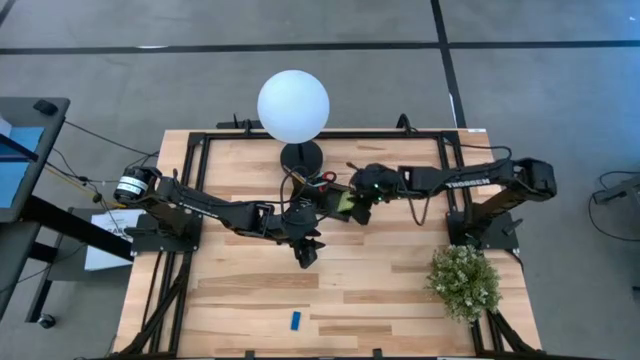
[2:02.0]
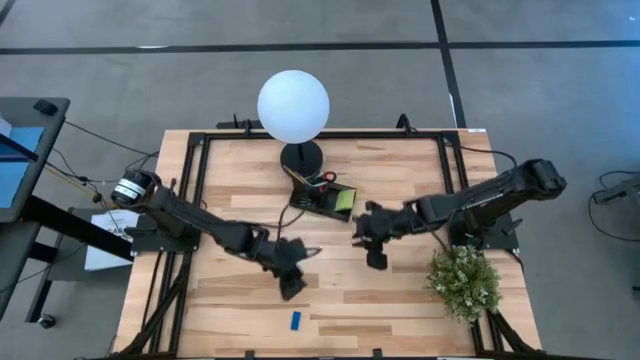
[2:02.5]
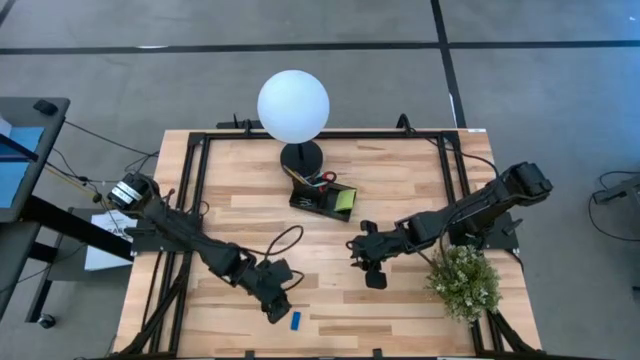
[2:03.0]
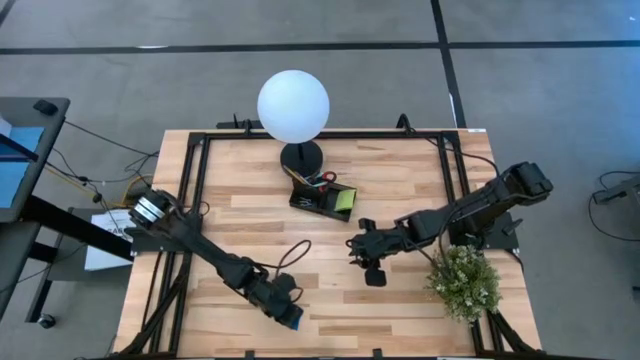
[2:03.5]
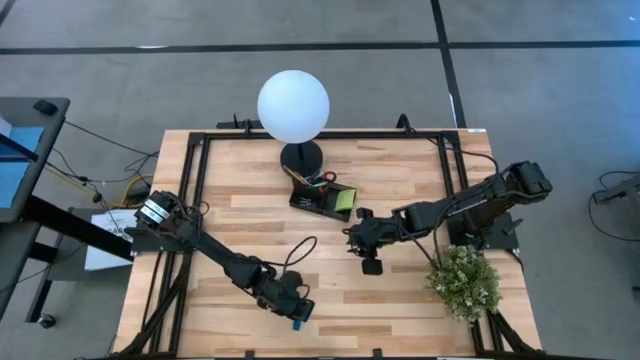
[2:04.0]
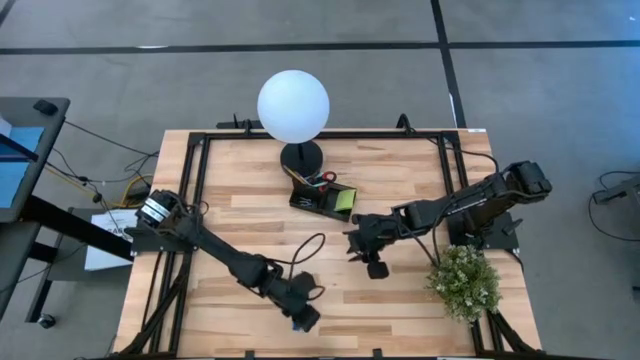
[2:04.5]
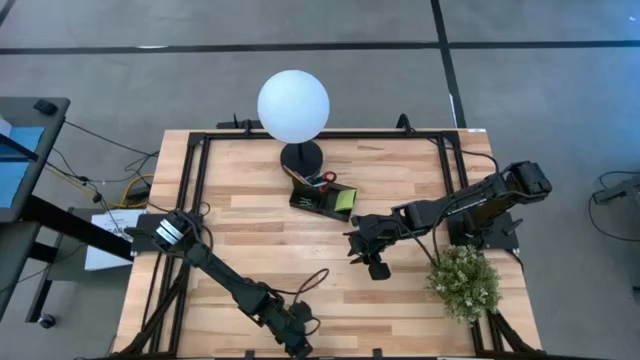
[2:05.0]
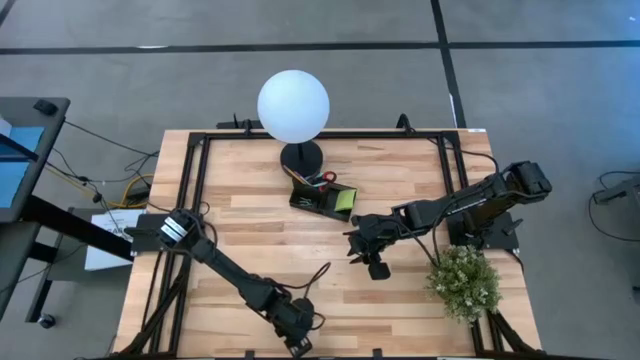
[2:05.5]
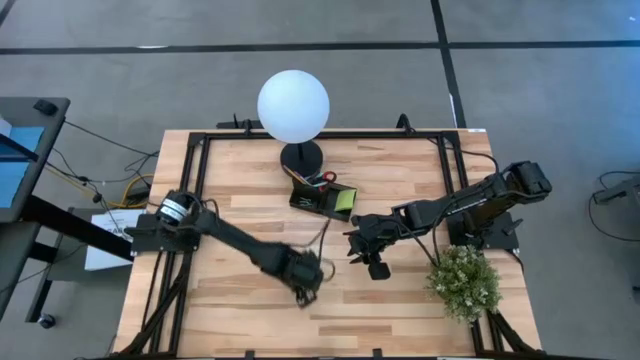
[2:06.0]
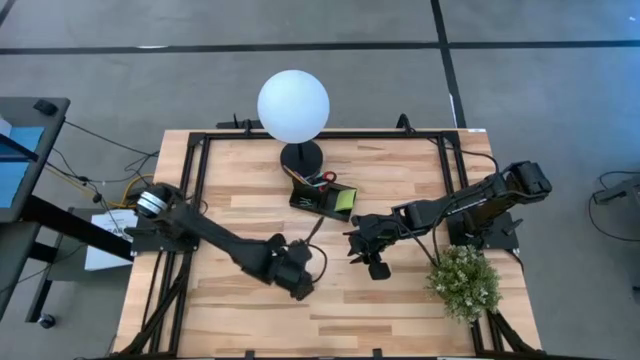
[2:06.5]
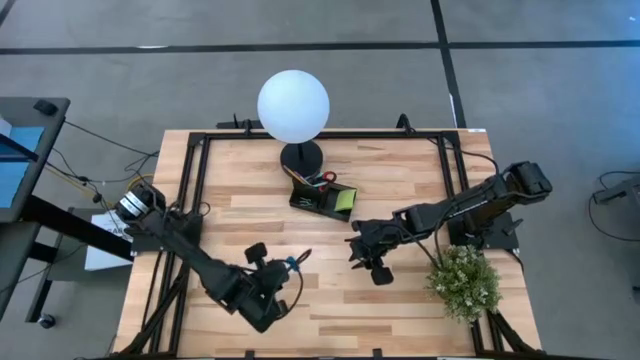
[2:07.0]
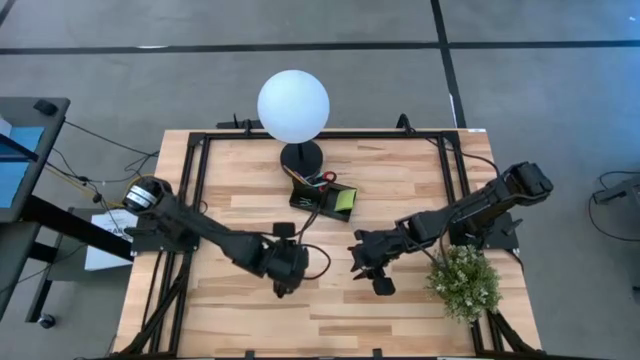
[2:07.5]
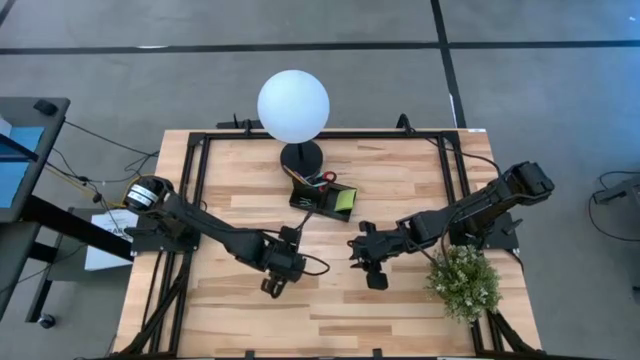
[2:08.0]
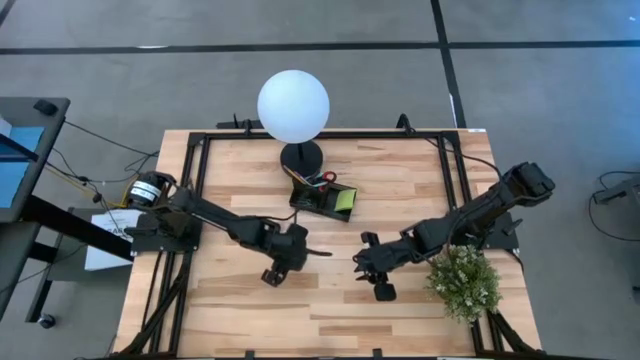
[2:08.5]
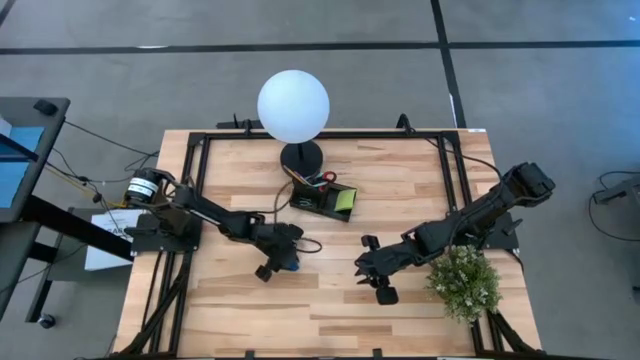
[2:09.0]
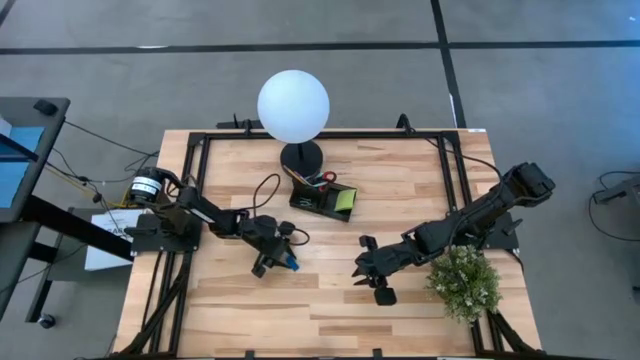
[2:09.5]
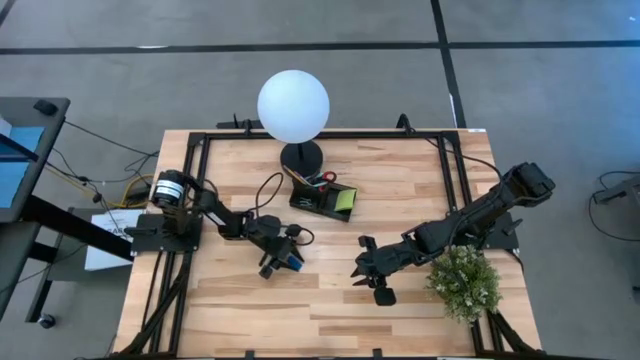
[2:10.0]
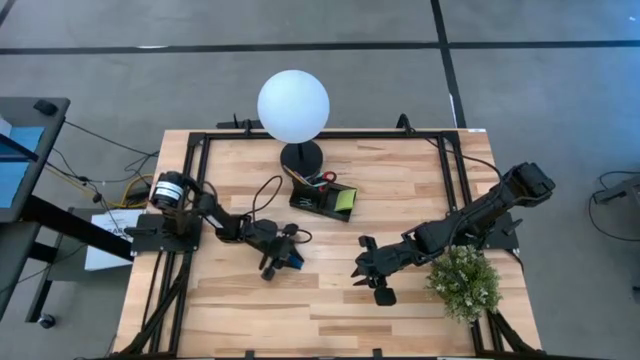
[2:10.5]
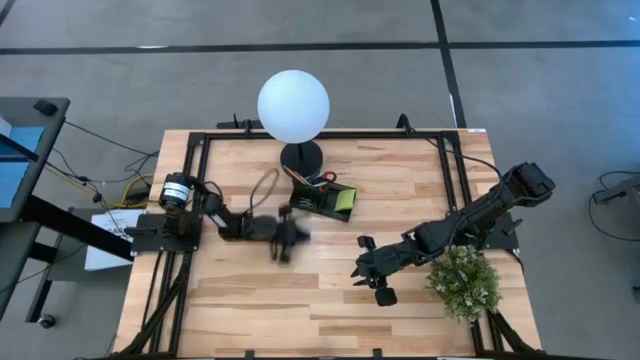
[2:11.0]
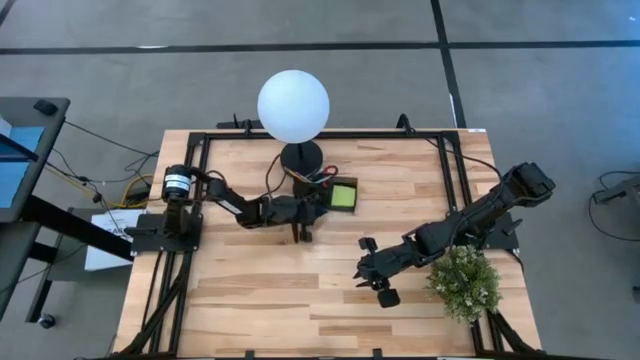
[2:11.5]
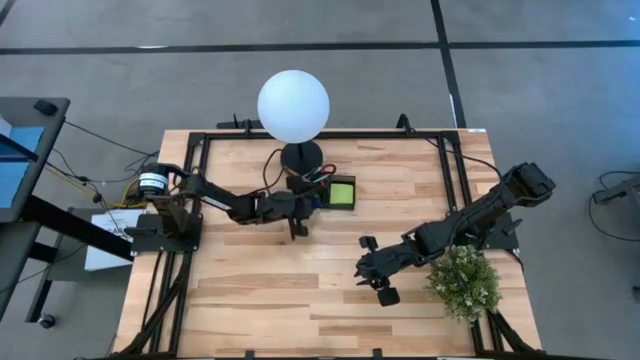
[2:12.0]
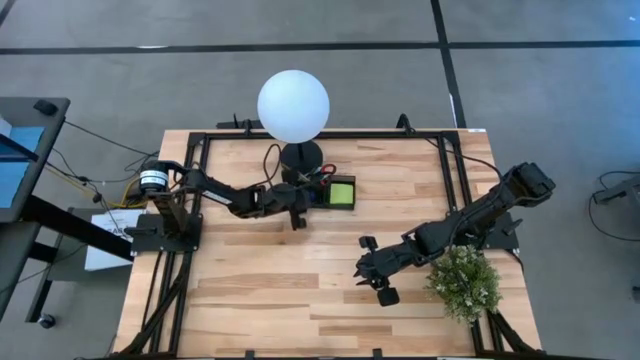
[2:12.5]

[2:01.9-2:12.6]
Task: Pick and place office supplies into organizer
Put the eraser into the desk organizer

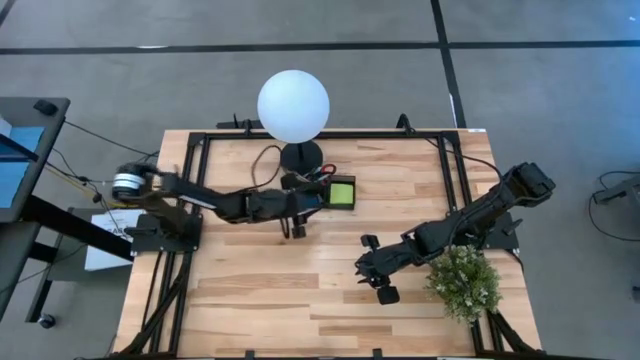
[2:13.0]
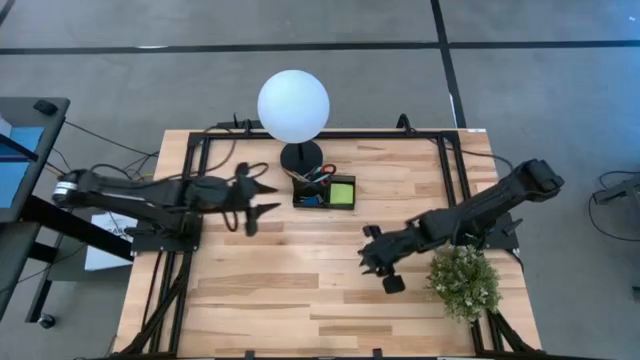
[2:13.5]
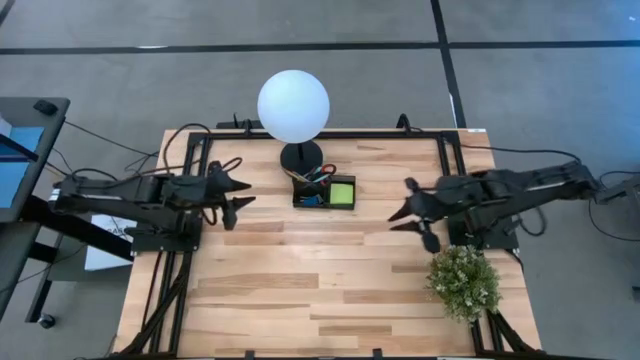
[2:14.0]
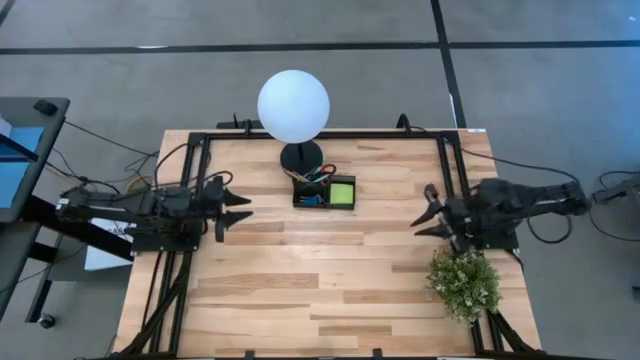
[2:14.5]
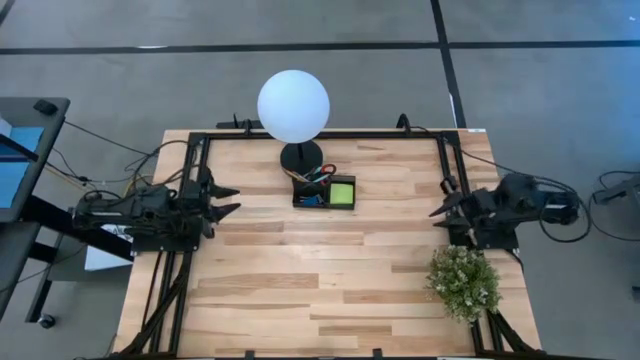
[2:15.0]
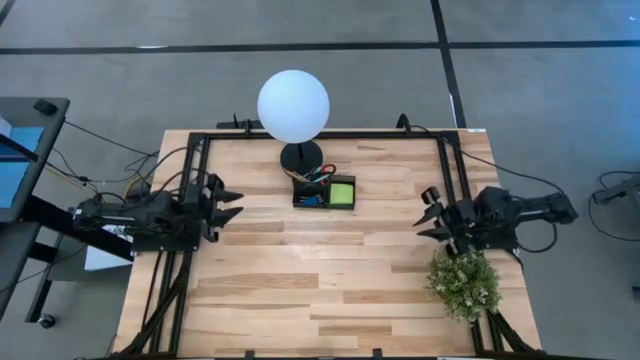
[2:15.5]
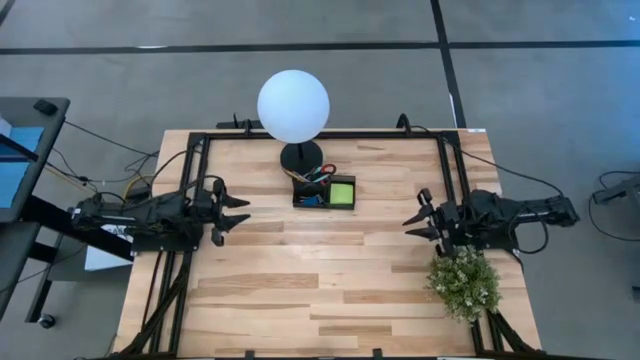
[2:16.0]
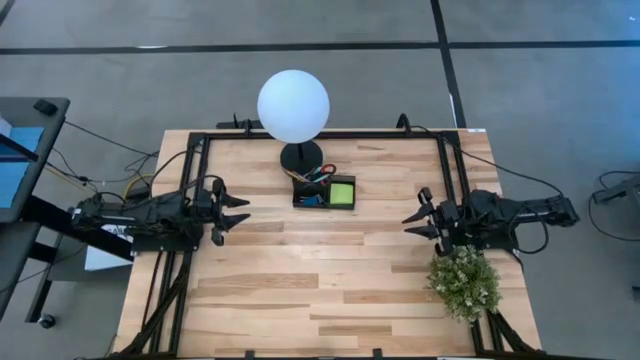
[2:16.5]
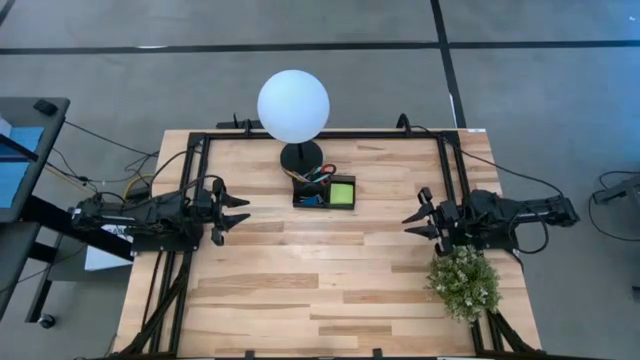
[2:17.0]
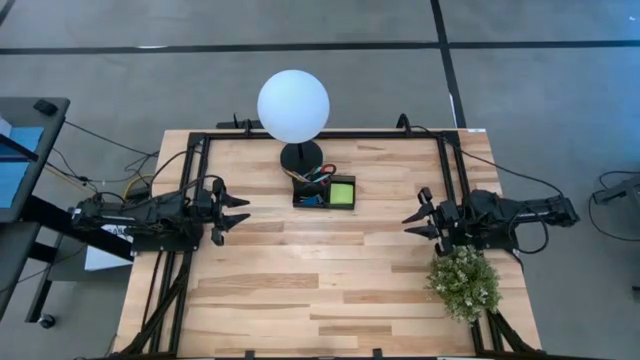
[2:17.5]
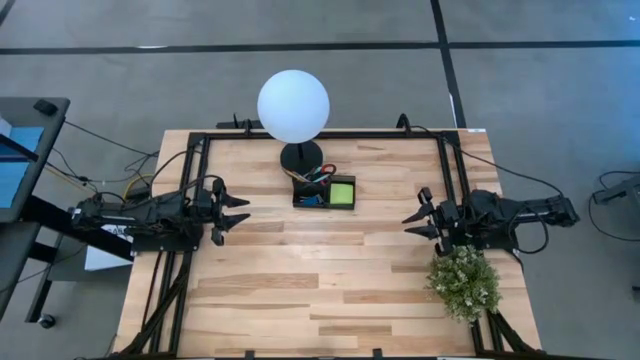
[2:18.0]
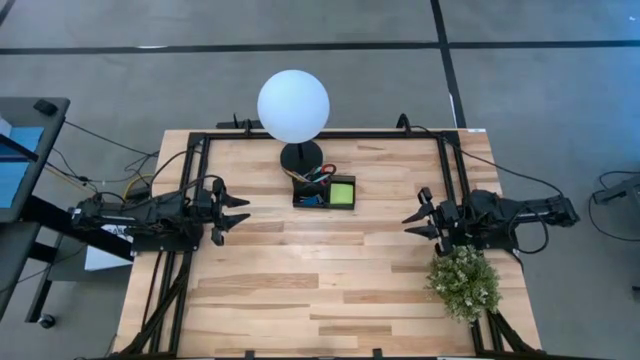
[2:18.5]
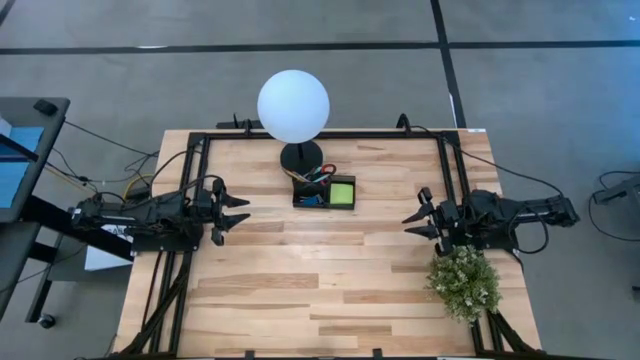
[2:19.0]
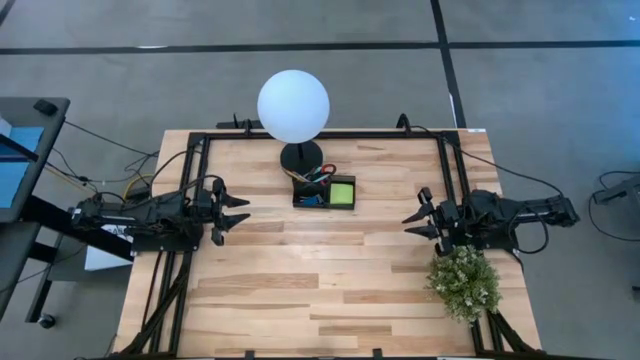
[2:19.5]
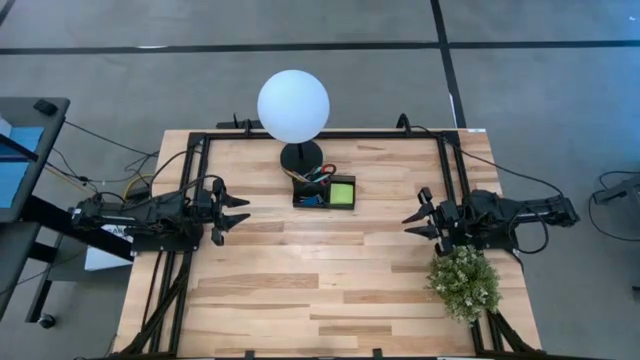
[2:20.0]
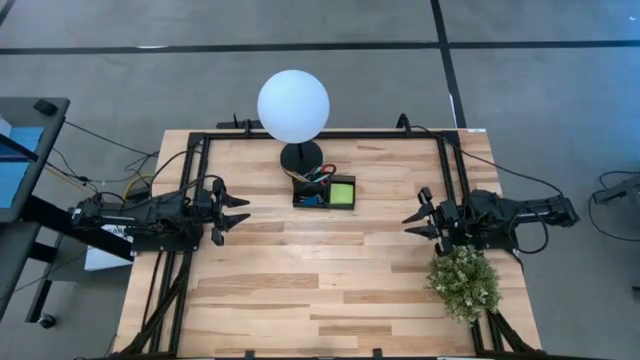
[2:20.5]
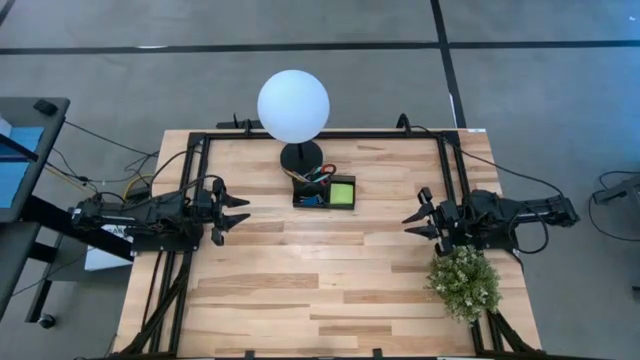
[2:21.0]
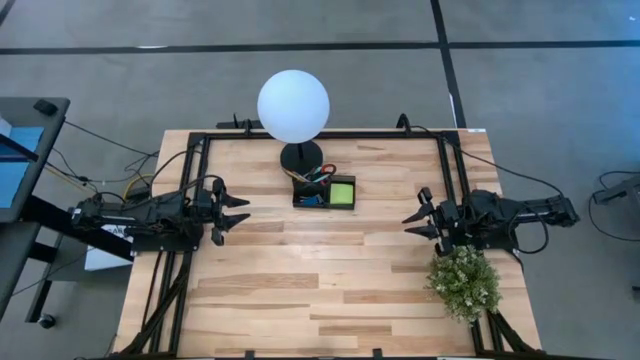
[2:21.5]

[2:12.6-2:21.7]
Return to Home Position

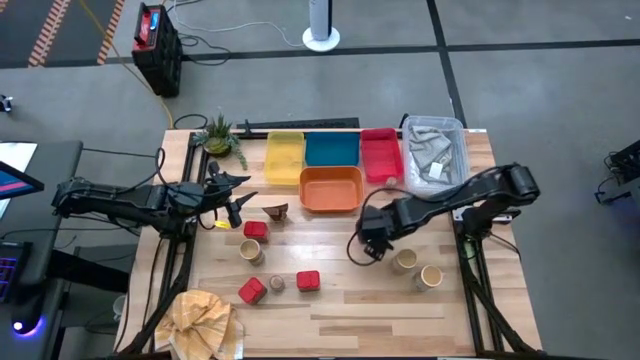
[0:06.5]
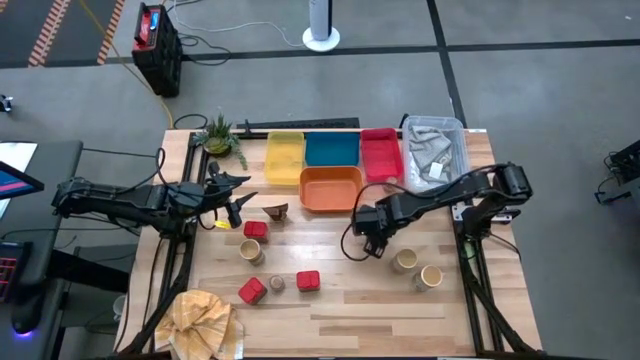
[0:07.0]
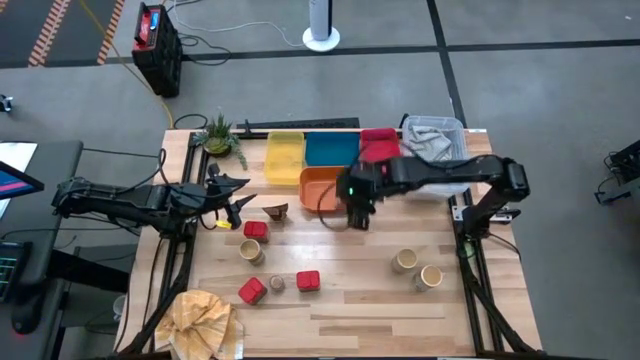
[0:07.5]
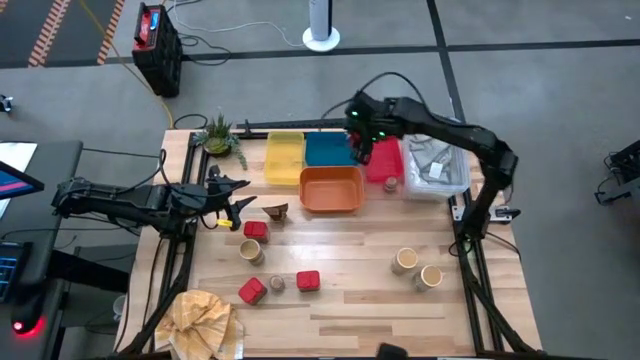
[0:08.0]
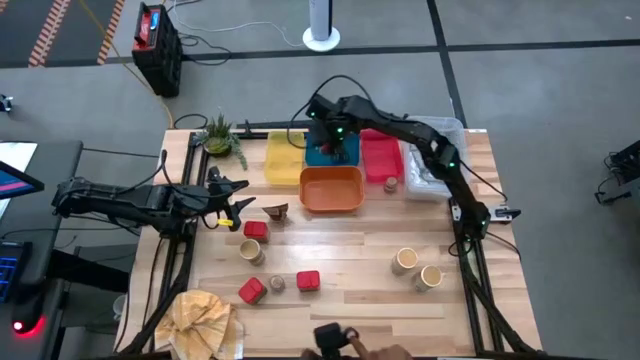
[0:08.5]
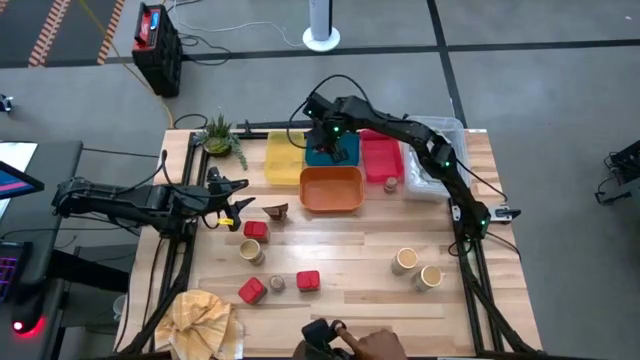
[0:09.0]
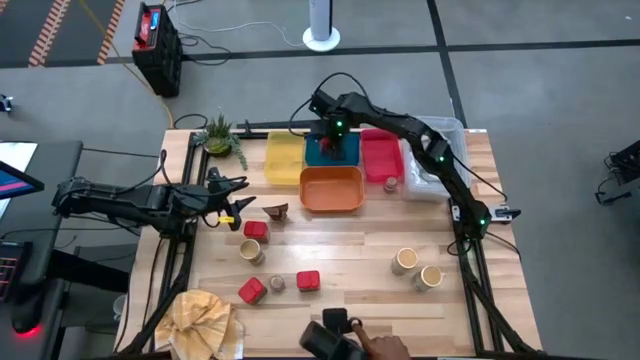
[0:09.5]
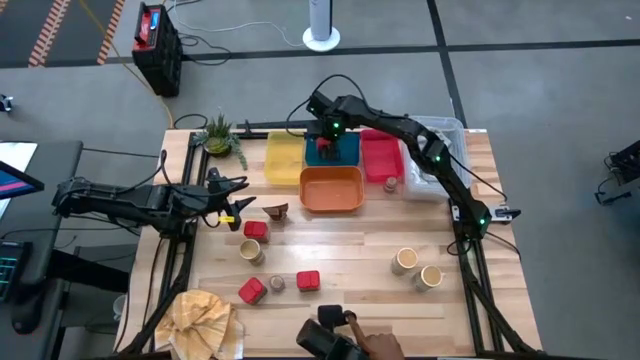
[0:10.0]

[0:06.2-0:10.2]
Task: Sort spices by type
Put the red seasoning can into the blue bin
